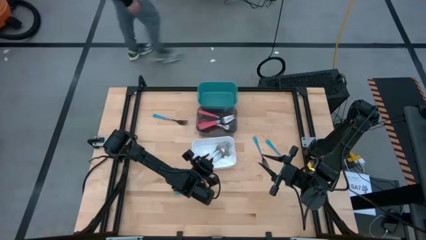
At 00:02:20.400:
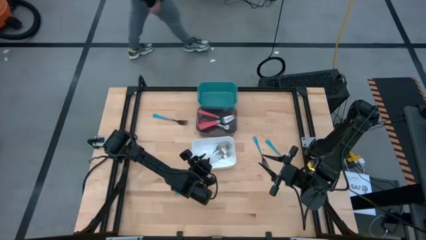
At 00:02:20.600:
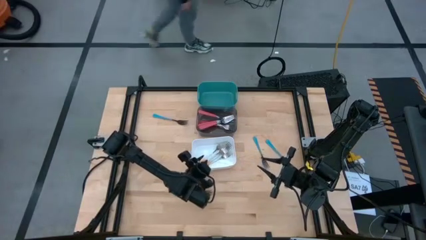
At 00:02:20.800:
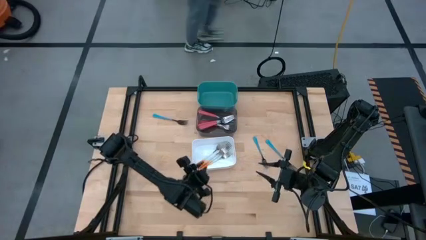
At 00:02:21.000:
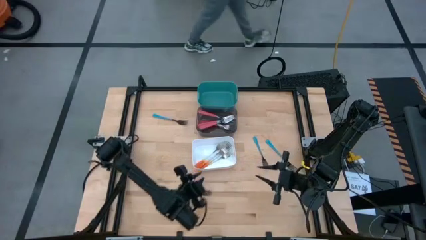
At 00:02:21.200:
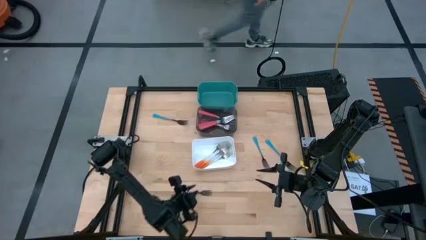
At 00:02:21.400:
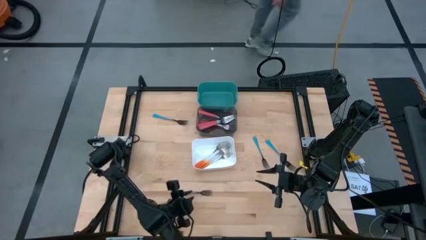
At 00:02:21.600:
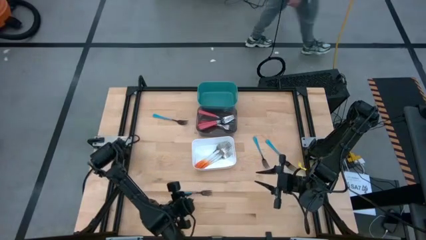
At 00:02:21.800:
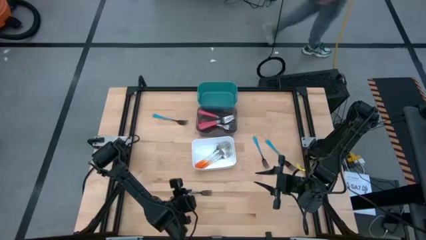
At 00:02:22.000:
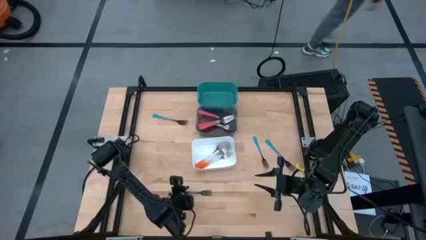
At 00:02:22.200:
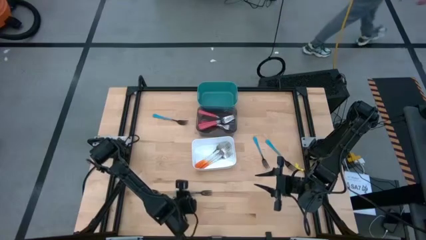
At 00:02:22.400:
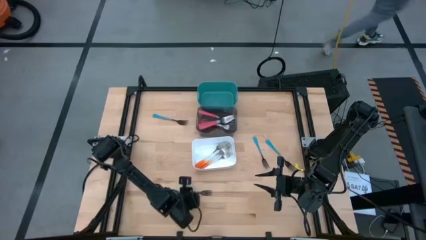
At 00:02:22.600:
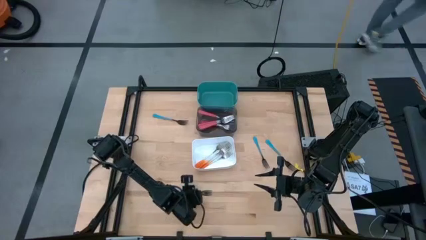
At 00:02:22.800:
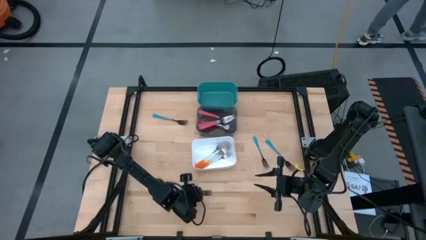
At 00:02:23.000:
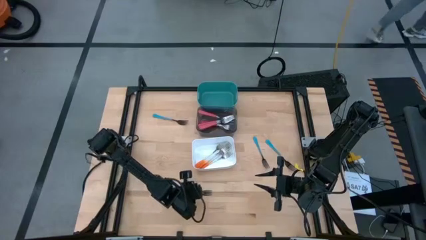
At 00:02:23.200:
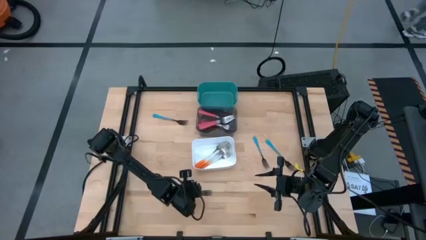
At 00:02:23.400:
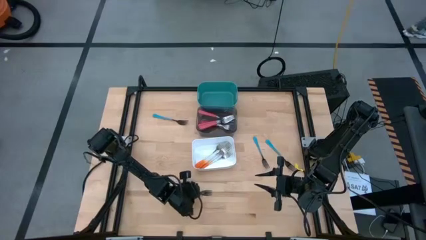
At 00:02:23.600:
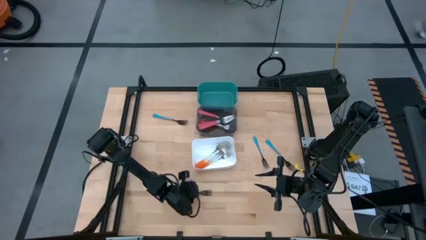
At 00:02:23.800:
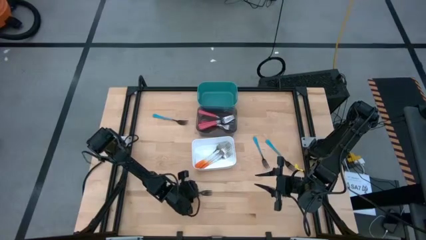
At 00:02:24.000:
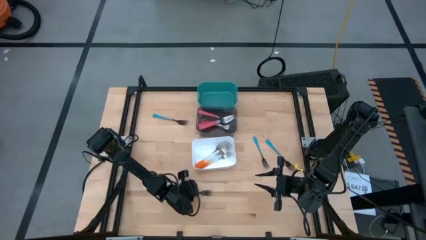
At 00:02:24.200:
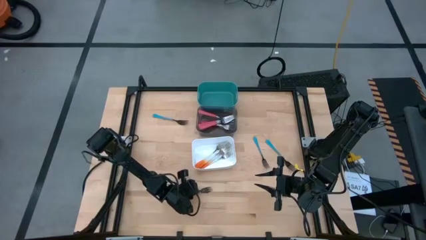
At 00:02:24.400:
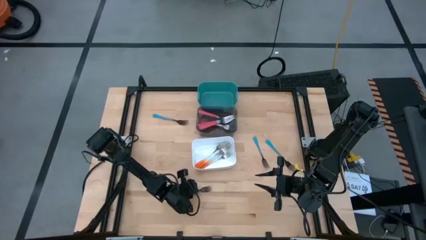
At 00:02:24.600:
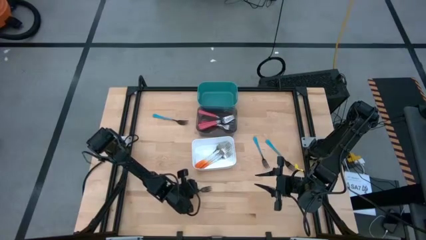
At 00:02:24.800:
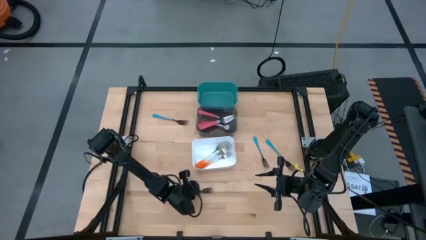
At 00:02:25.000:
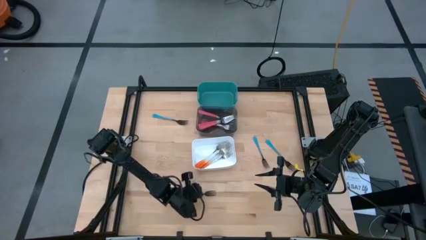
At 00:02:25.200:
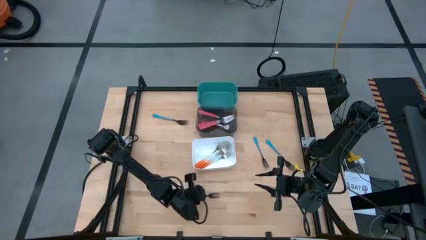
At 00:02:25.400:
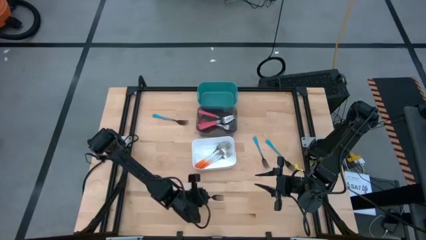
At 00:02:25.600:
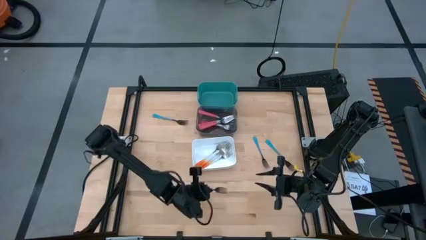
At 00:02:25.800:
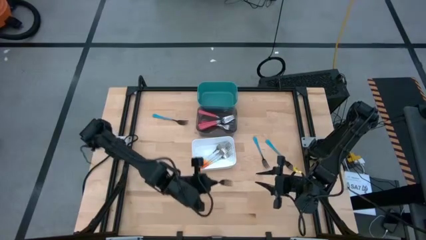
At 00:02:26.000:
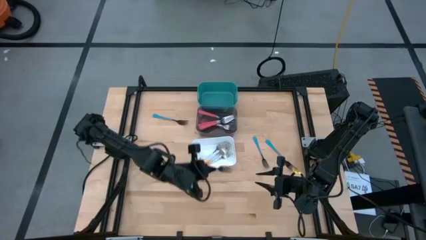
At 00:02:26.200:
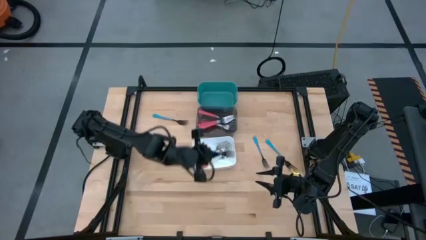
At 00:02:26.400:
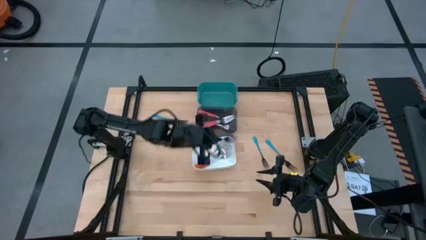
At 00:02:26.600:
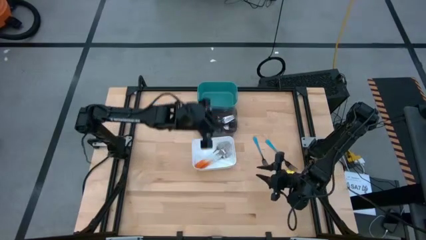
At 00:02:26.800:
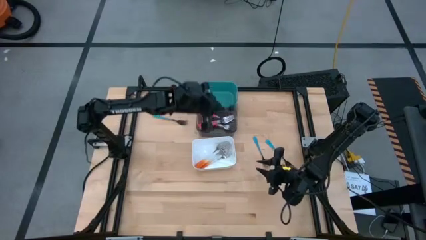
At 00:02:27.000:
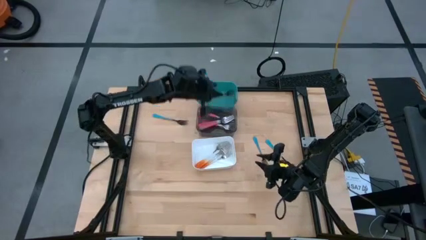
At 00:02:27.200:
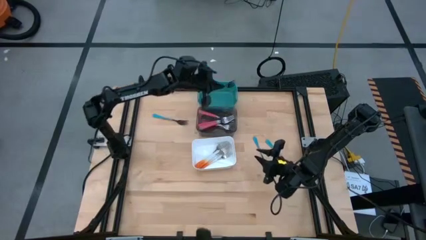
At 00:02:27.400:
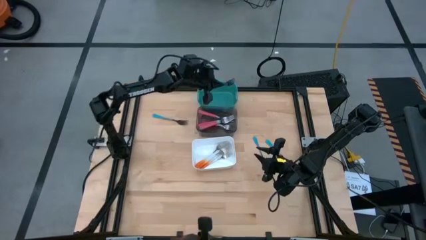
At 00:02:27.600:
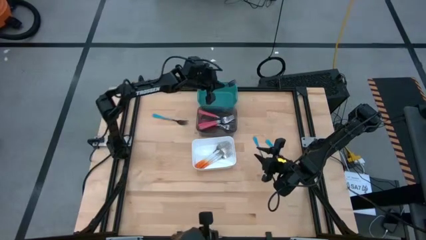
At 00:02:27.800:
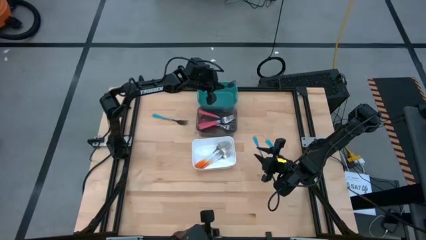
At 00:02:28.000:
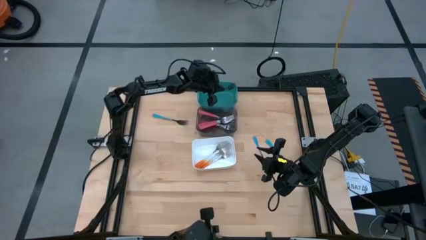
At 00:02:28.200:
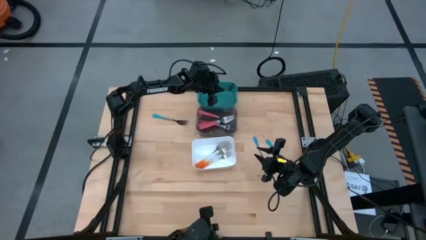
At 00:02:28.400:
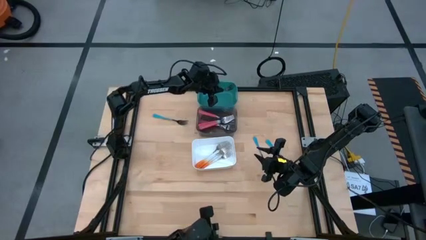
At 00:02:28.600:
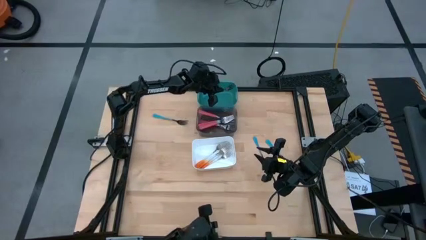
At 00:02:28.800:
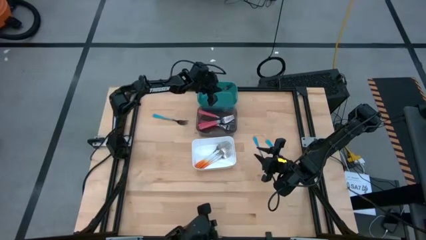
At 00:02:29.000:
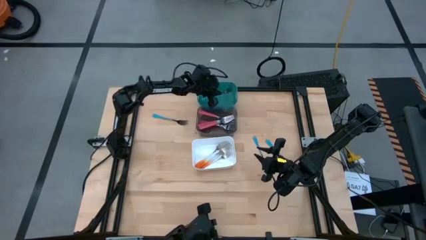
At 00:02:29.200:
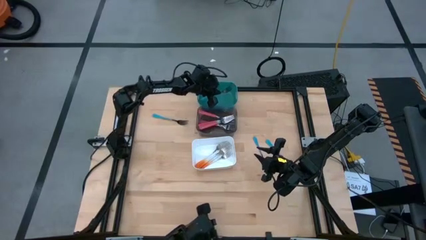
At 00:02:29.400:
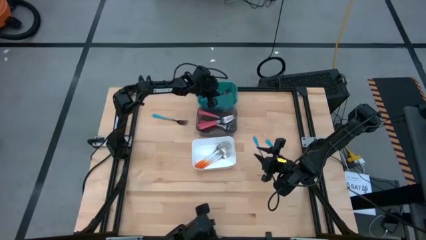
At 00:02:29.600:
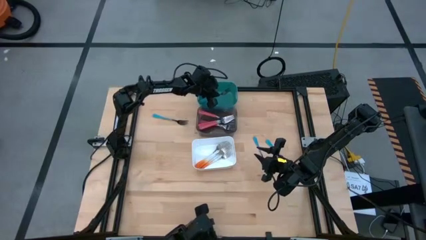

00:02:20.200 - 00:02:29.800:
Task: Sort silverware by color (type)
Put the bottom blue fork into the blue bin
